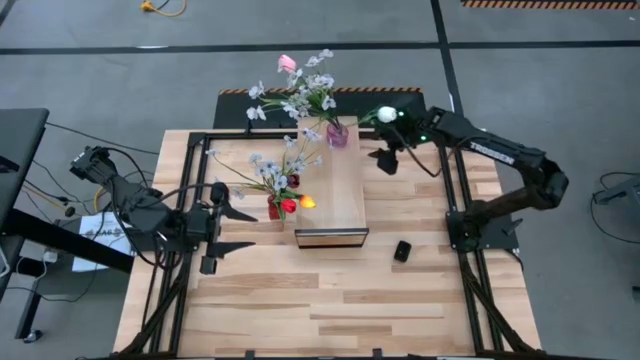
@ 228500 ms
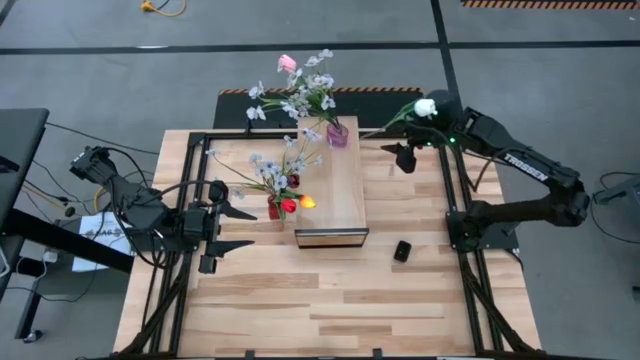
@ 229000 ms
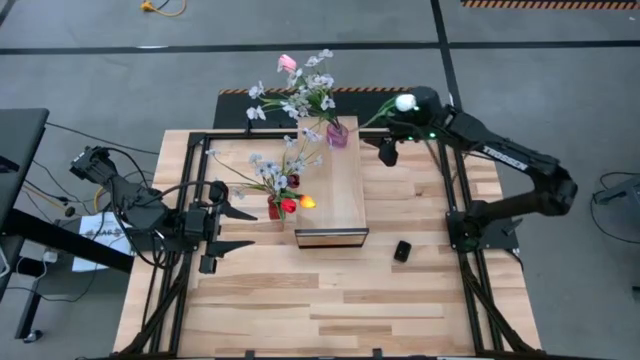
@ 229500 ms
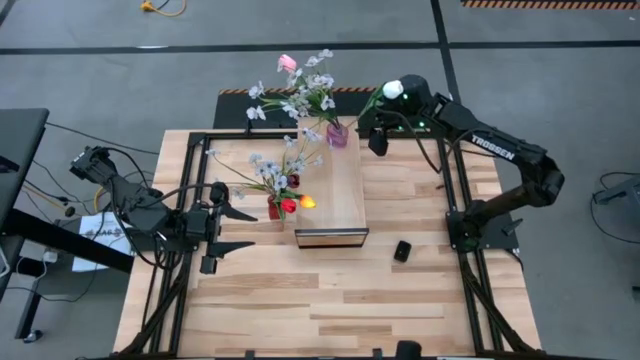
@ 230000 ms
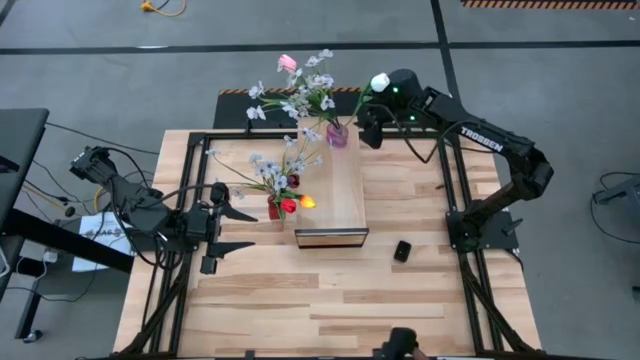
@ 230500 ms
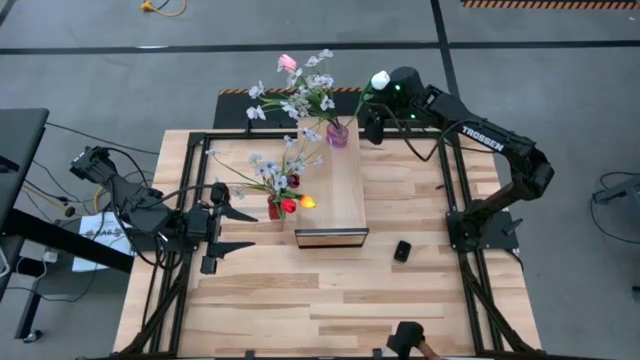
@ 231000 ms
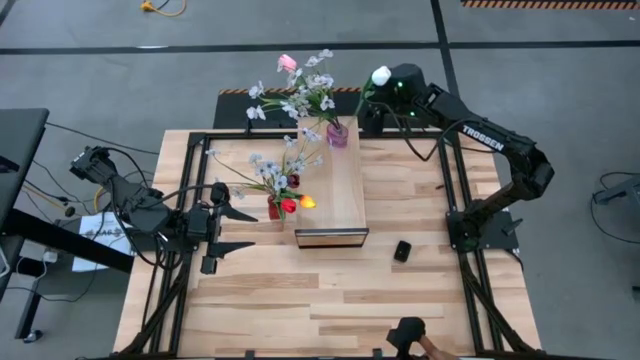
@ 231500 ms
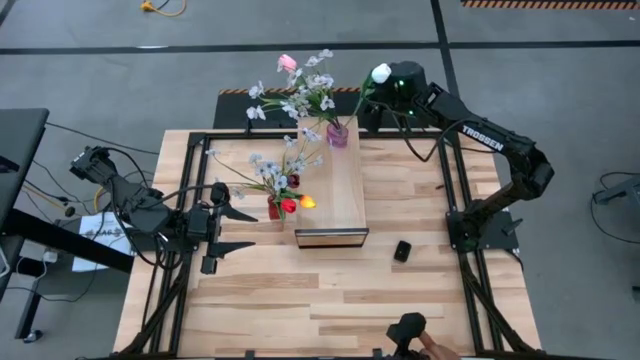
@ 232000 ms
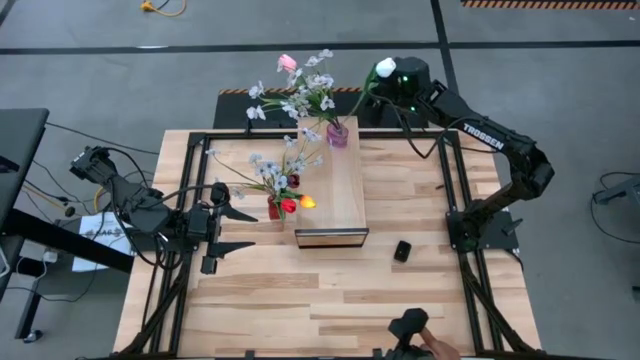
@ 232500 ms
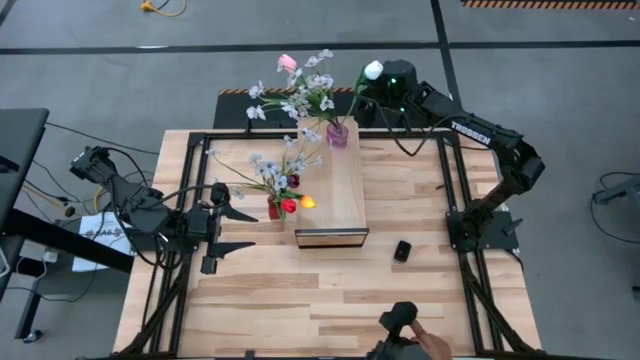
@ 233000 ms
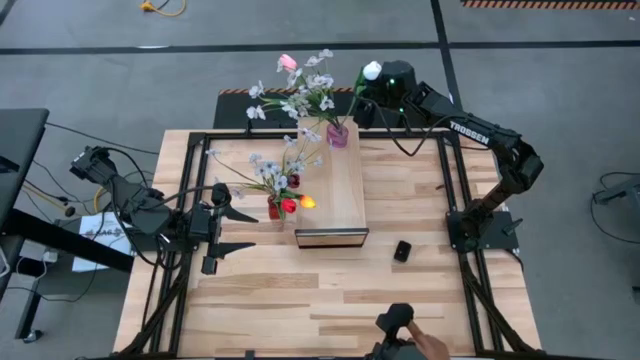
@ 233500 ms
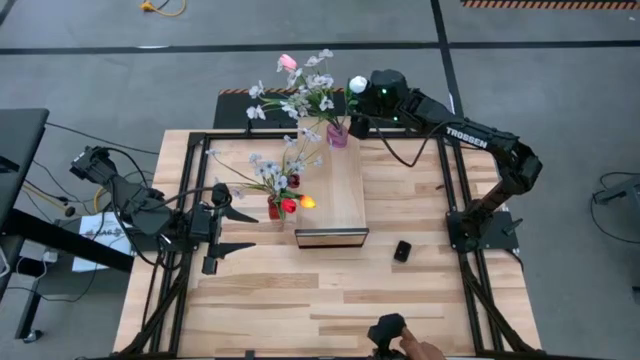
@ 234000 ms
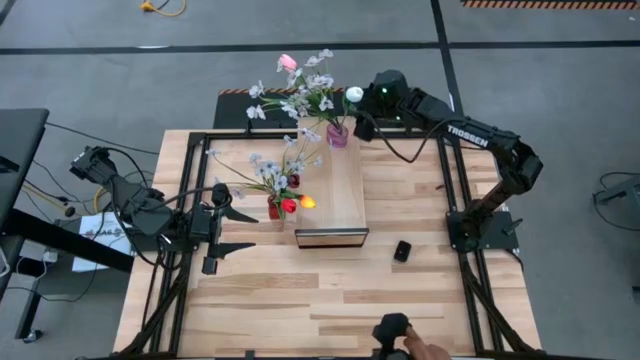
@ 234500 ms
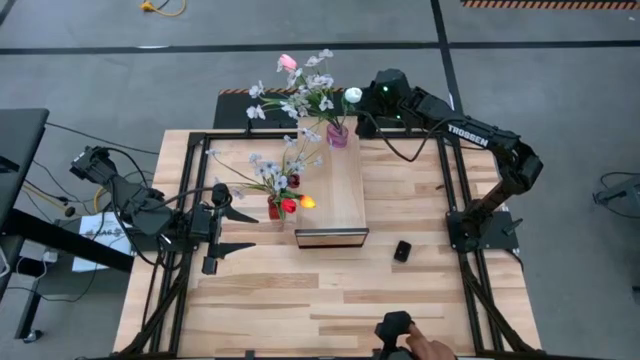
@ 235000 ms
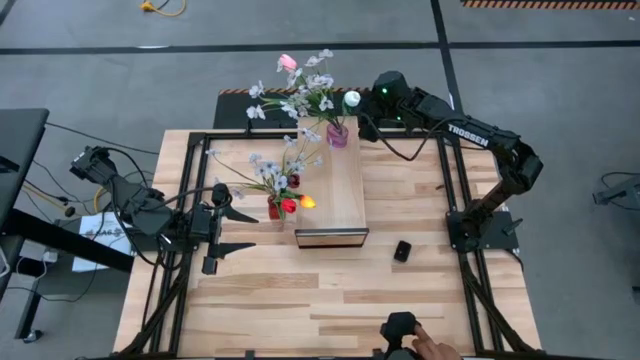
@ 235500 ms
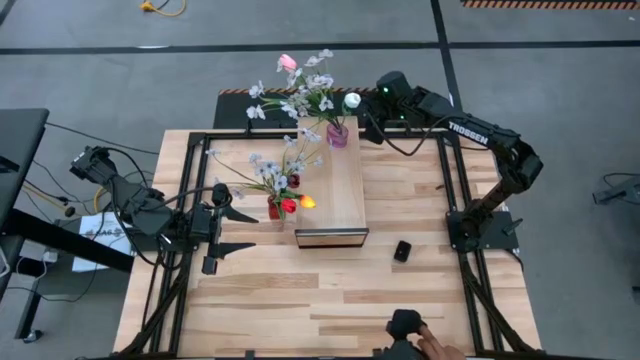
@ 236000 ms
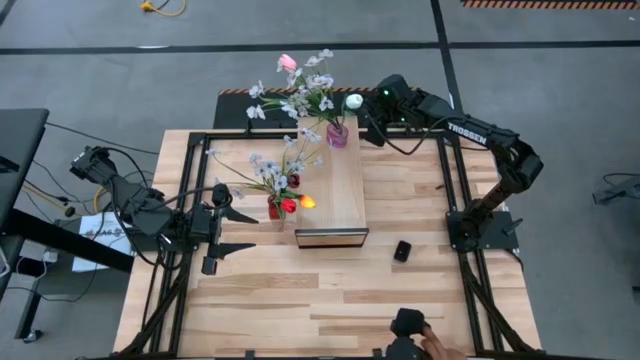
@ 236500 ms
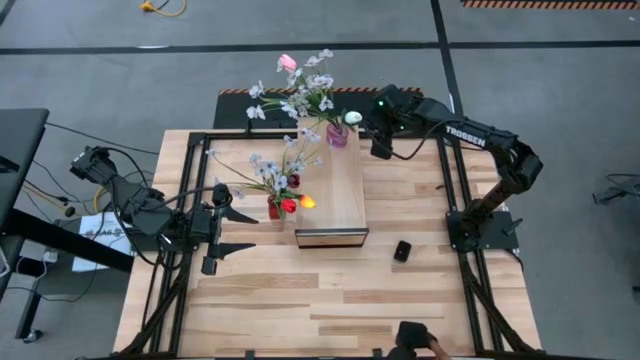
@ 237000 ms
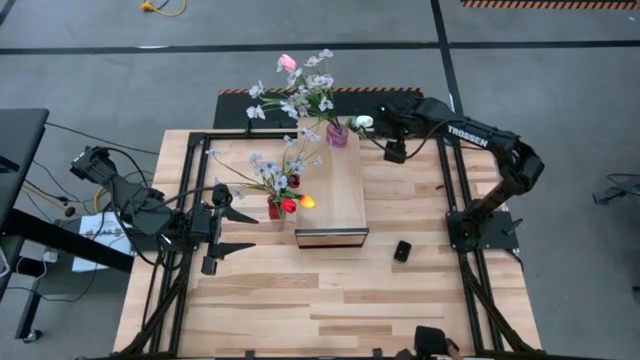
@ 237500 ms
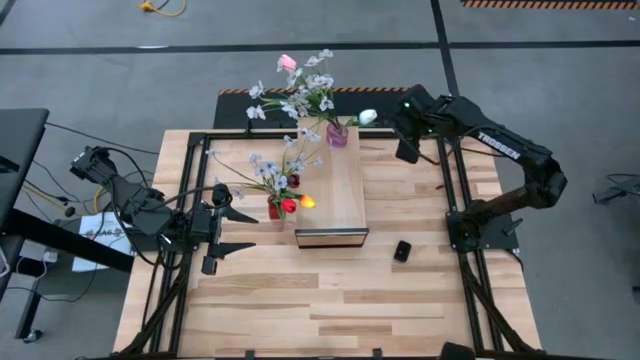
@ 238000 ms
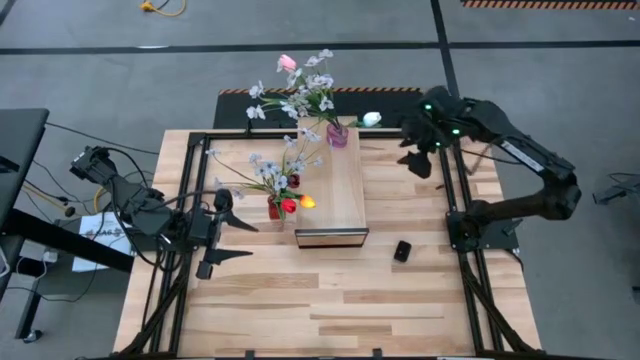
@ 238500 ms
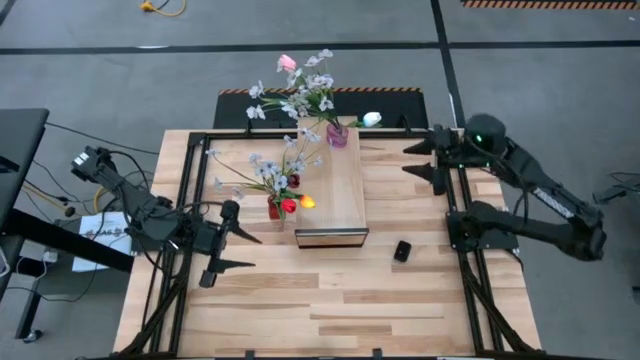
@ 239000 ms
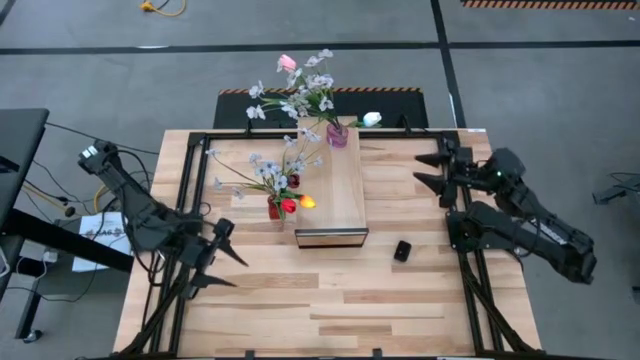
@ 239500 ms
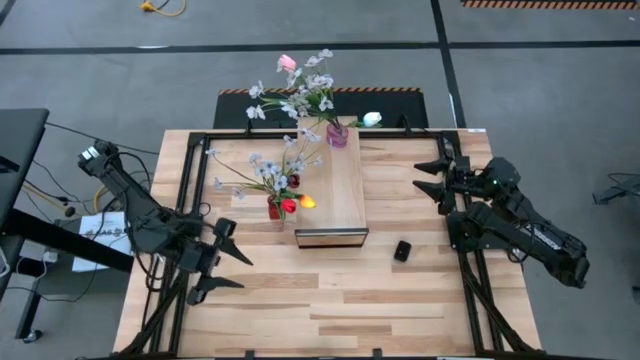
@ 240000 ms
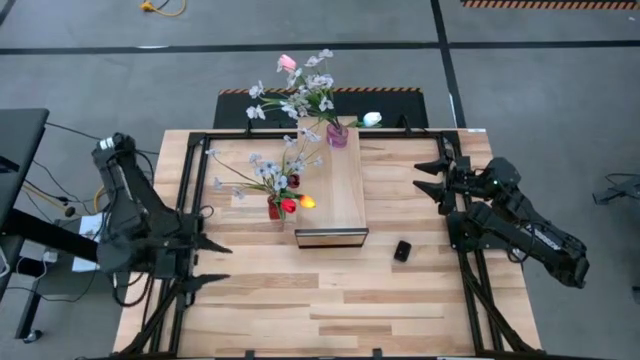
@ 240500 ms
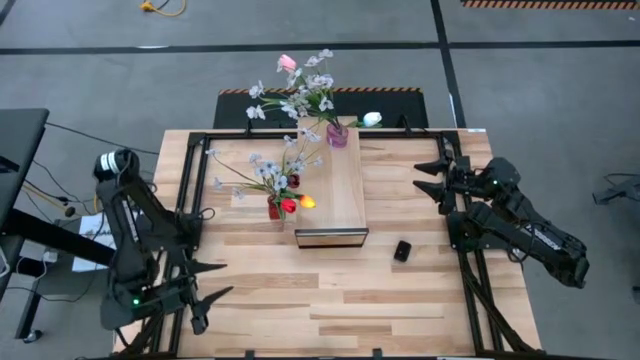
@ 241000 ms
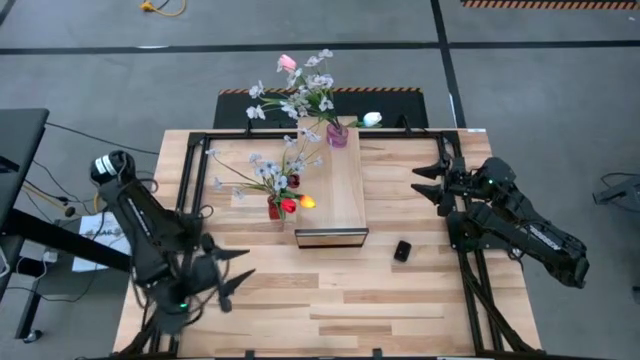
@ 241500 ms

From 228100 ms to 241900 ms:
Task: Pick and place flowers into a vace then onto a shelf
Put the red flower vase with flowers on the shelf

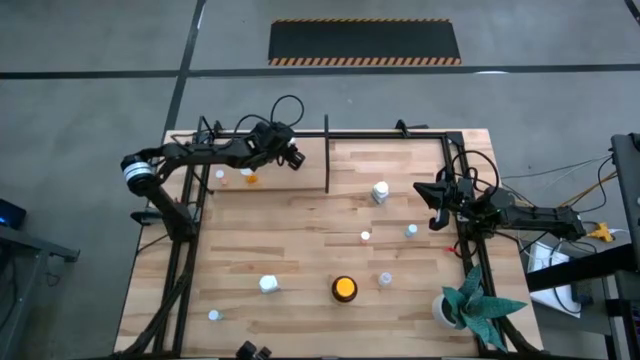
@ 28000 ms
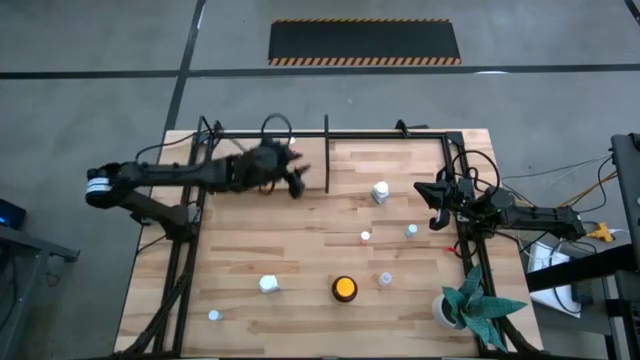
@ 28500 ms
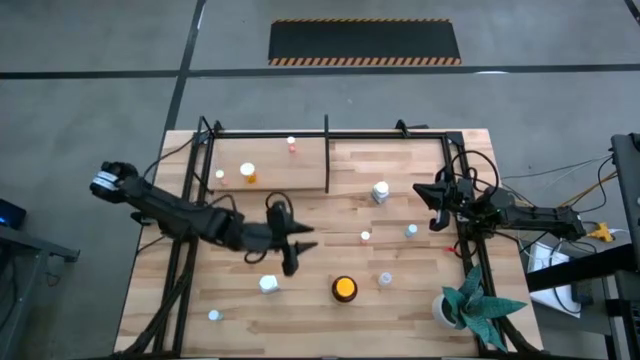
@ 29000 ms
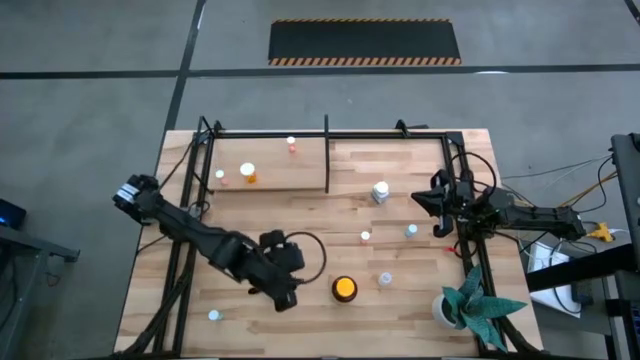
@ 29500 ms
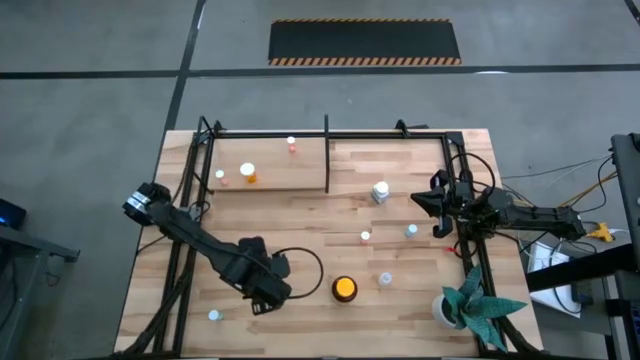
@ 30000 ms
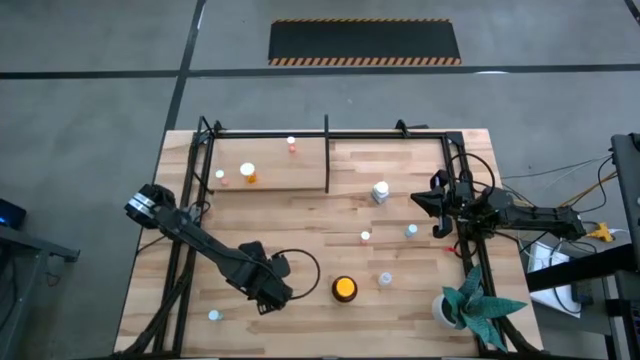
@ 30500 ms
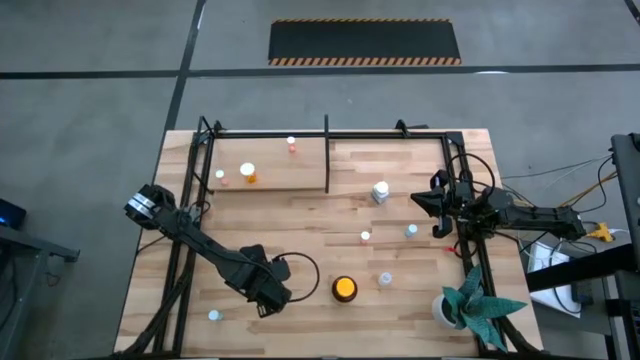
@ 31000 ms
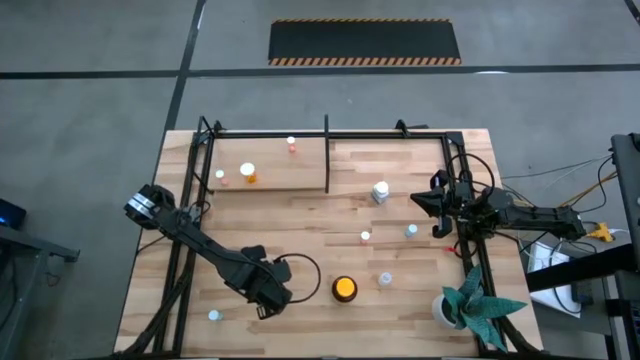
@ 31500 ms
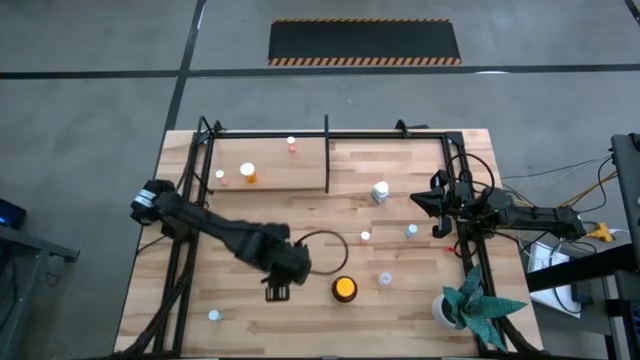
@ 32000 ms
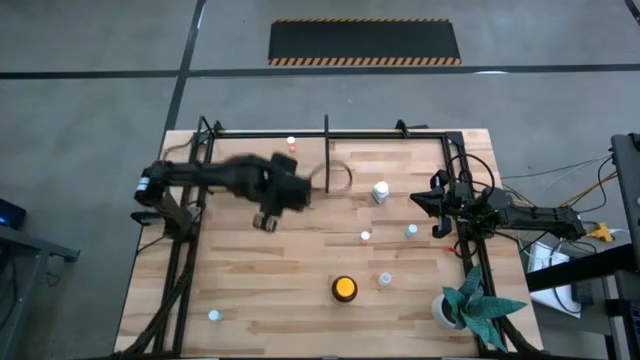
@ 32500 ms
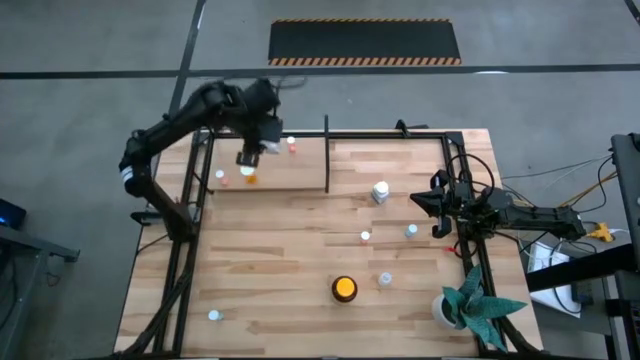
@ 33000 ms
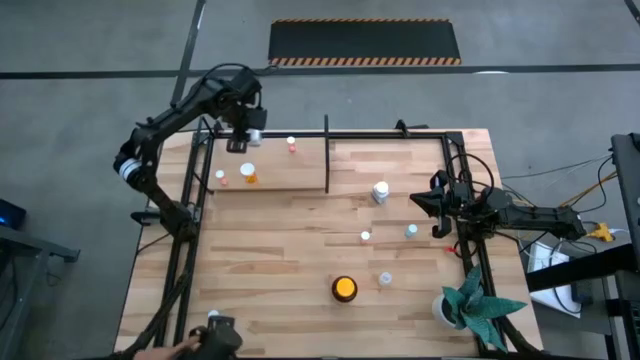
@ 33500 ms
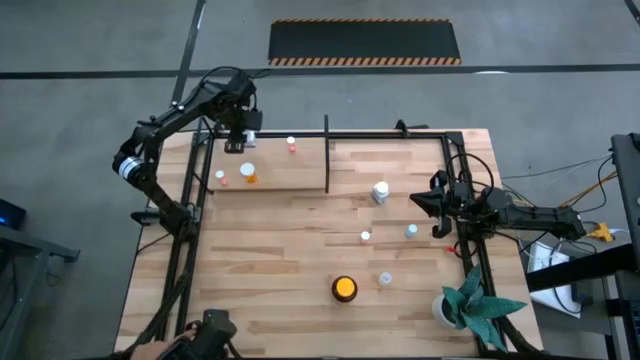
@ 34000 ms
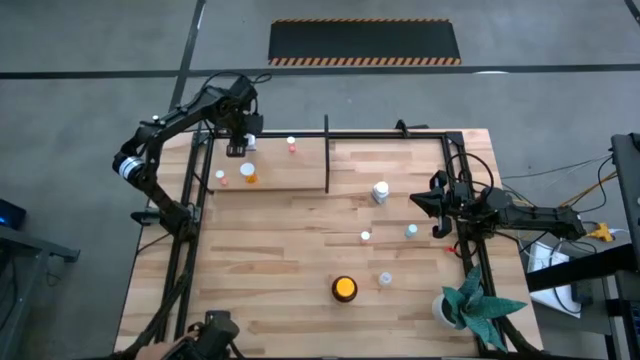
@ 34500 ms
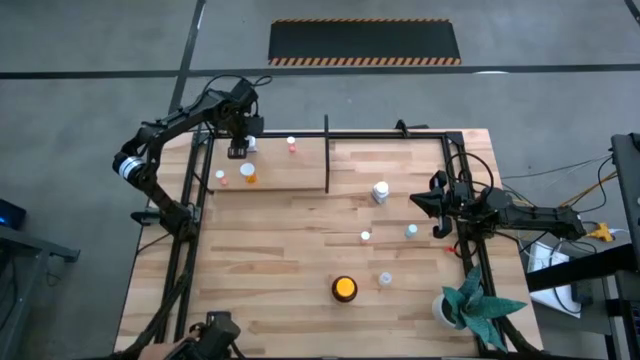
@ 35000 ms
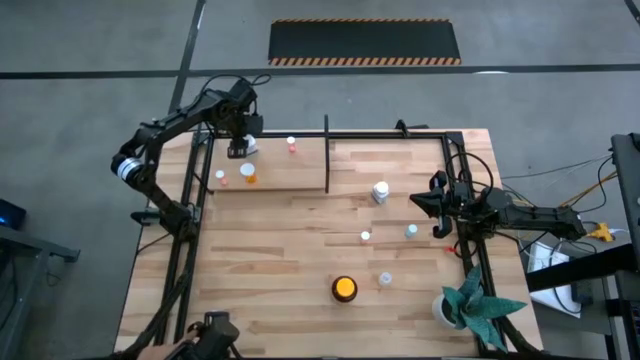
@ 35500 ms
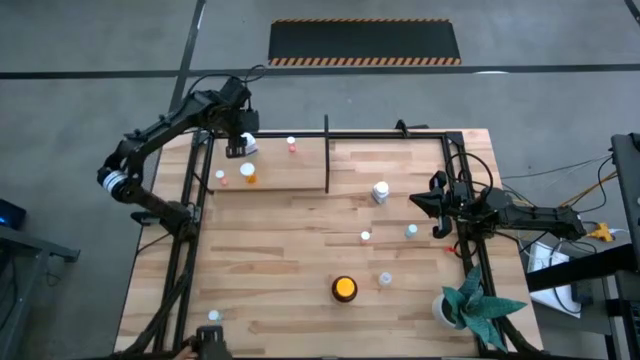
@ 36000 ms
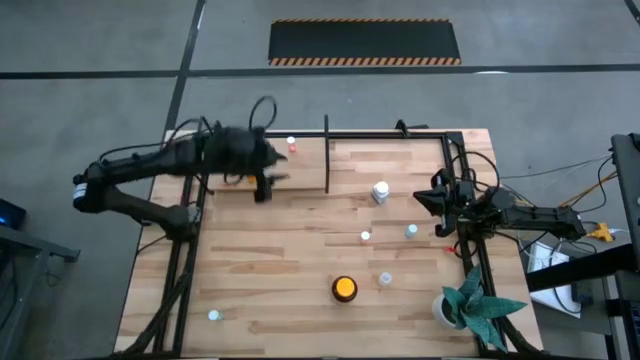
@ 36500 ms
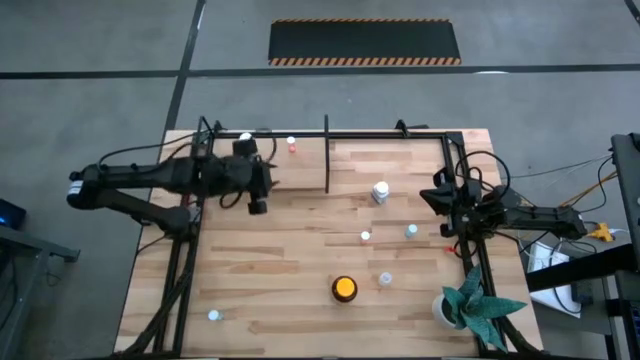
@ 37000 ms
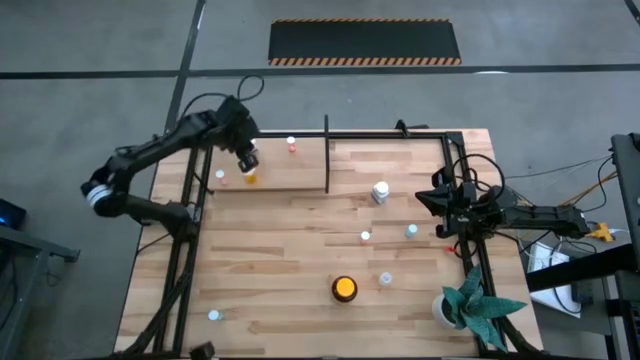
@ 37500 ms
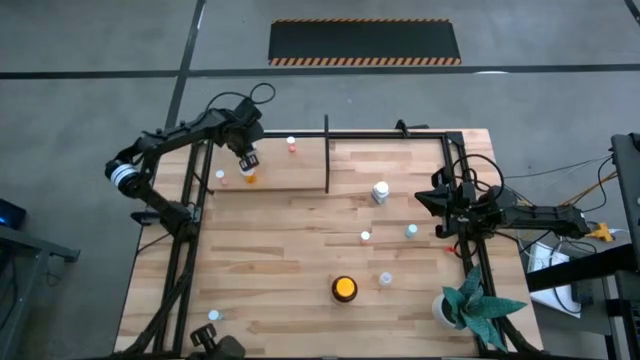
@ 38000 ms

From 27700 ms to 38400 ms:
Task: Pick and place medicine bottles onto shelf by color
Put the bottom white pill bottle on the shelf
